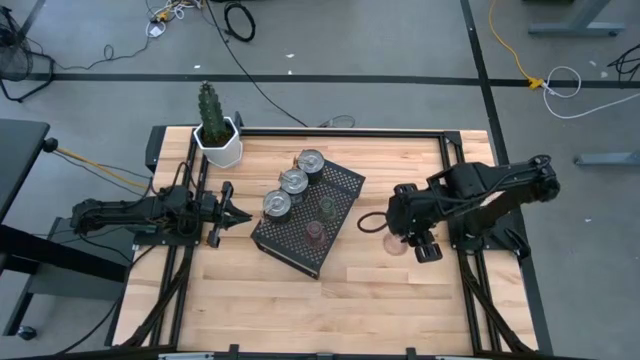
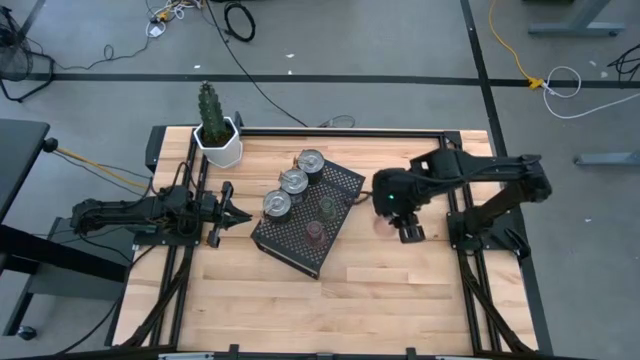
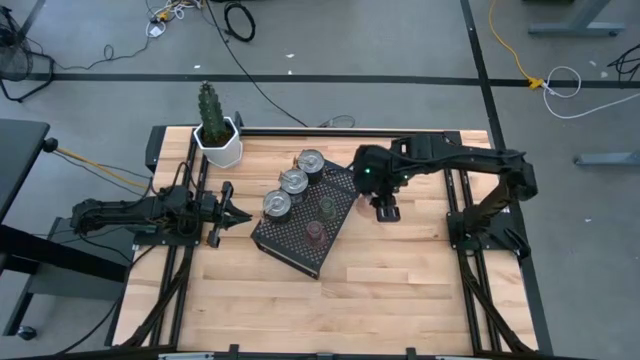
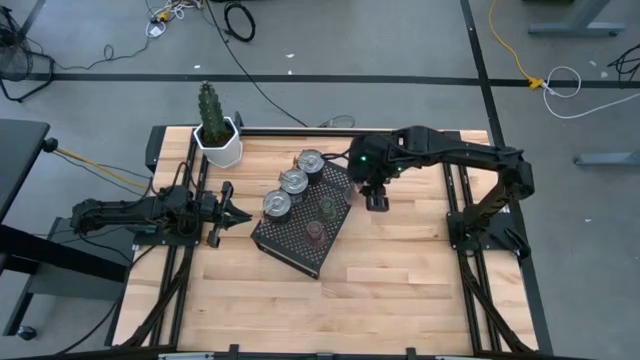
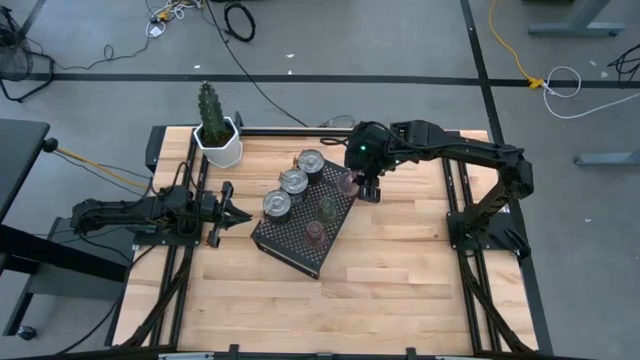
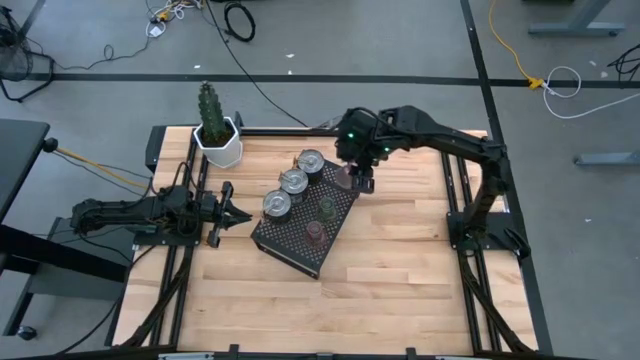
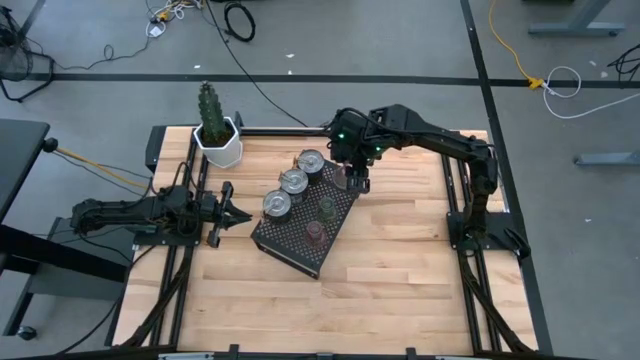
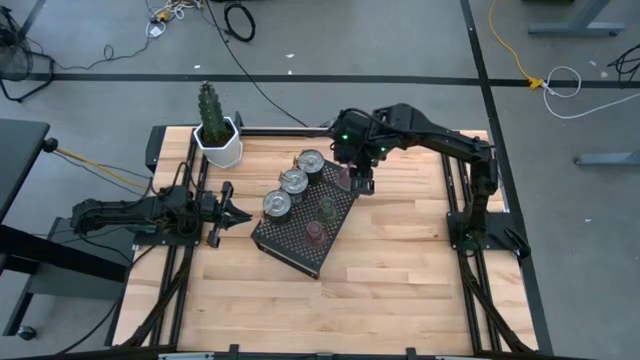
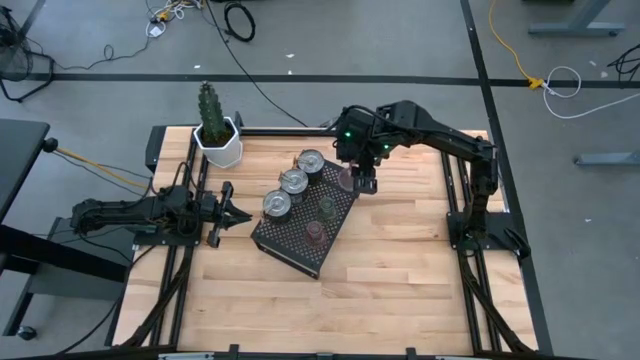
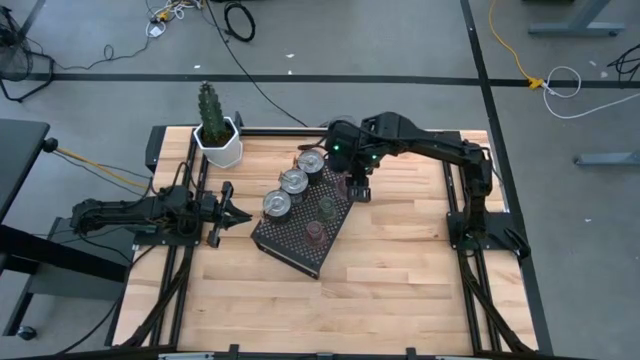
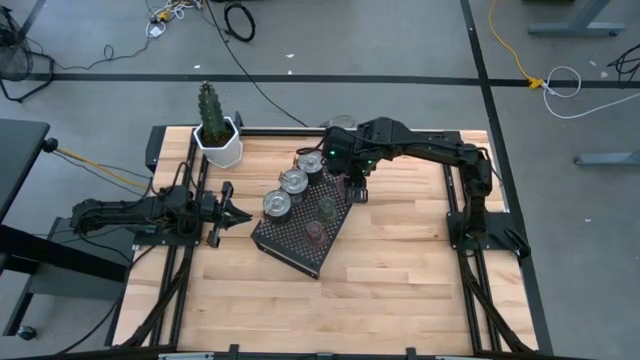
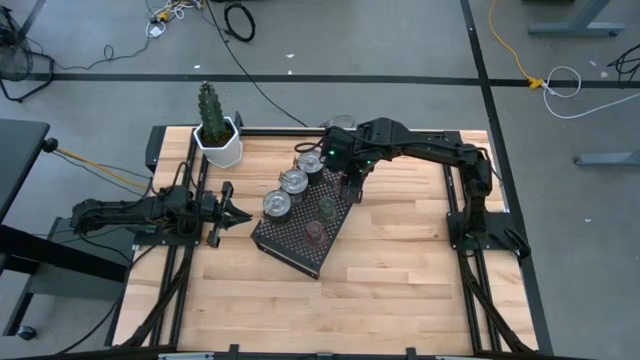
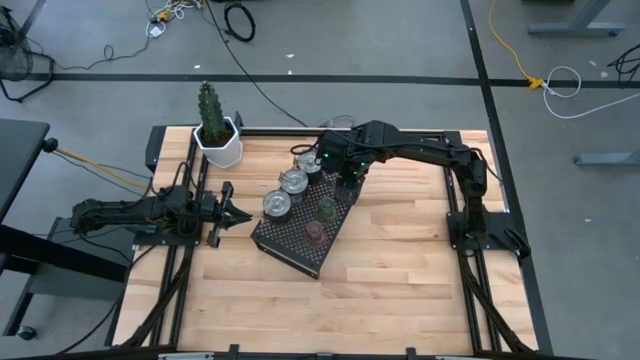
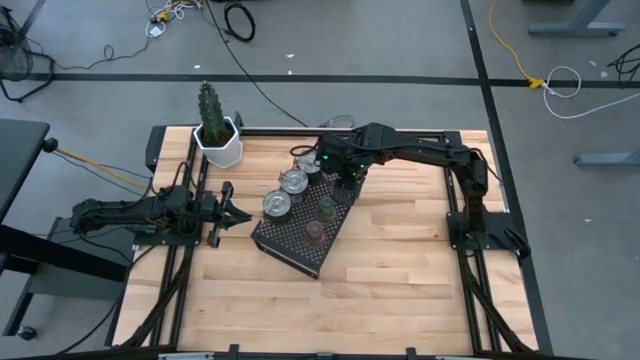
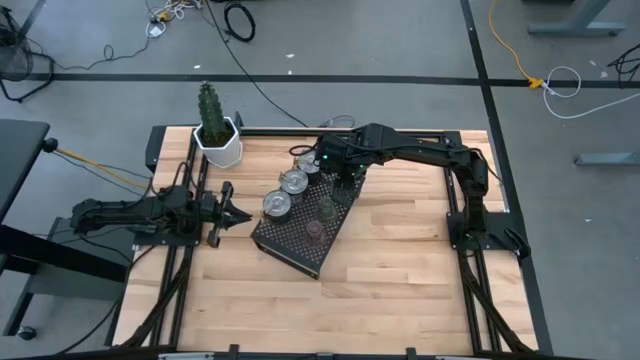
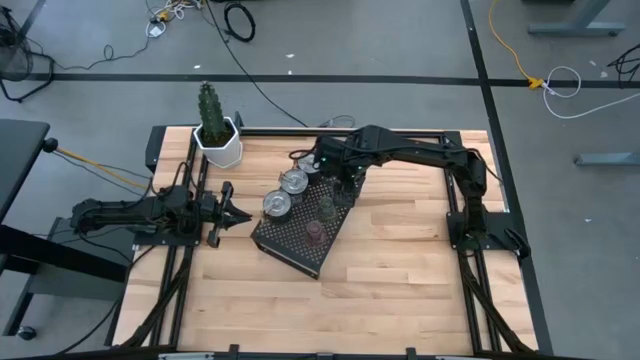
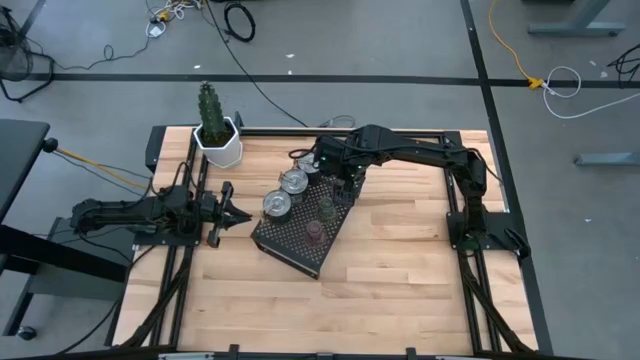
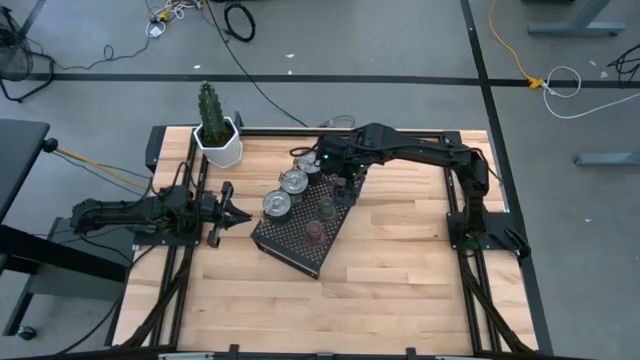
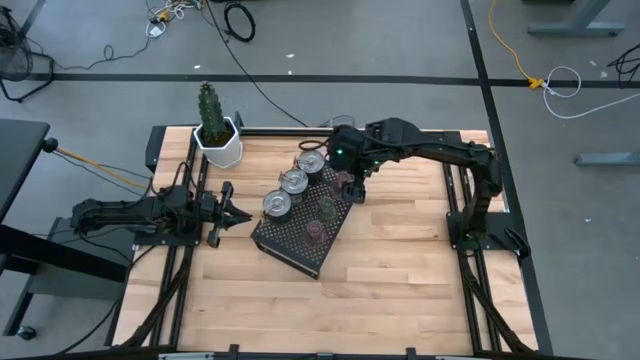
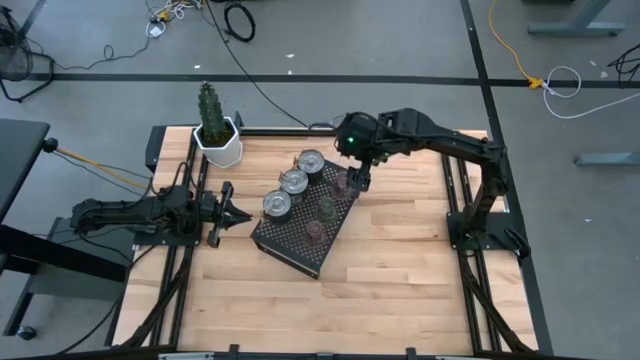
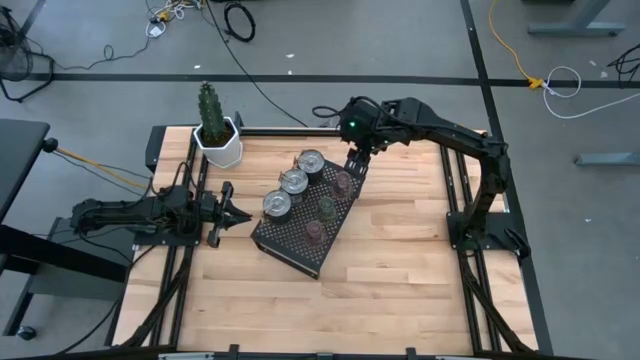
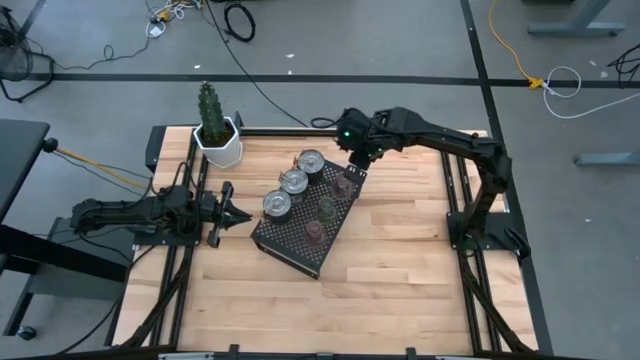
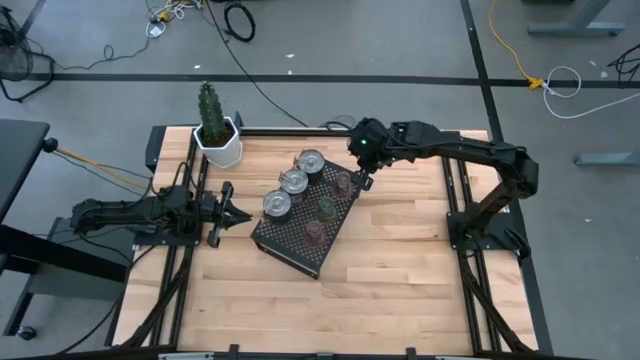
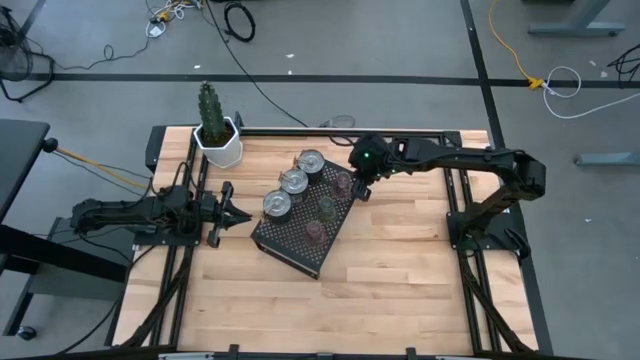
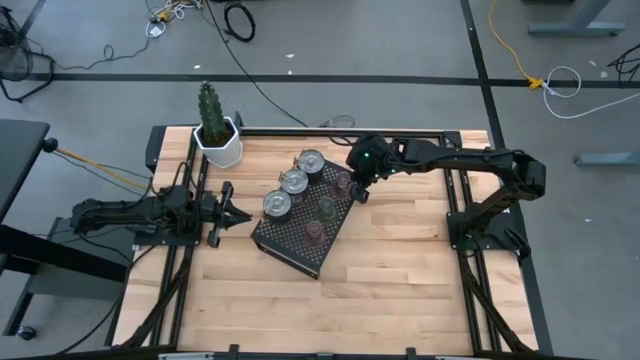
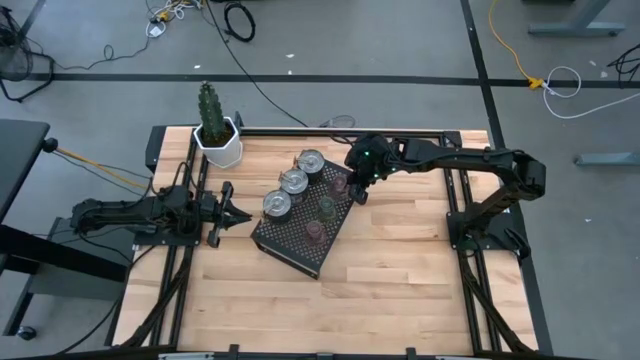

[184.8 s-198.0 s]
Task: Pick & Place candle stick holders
Put the purple candle holder on the shelf

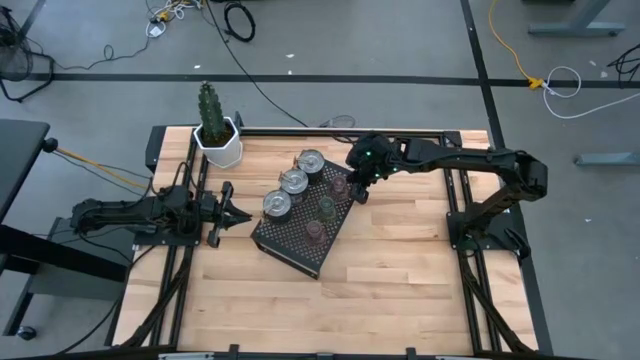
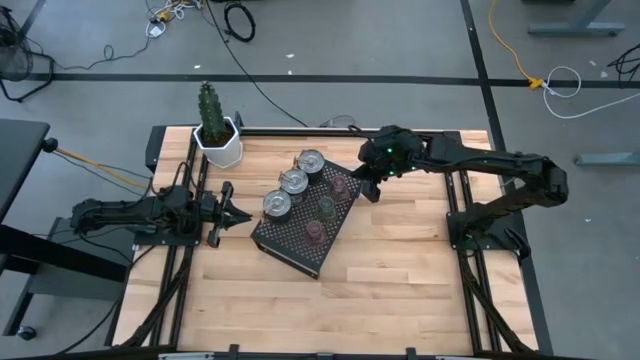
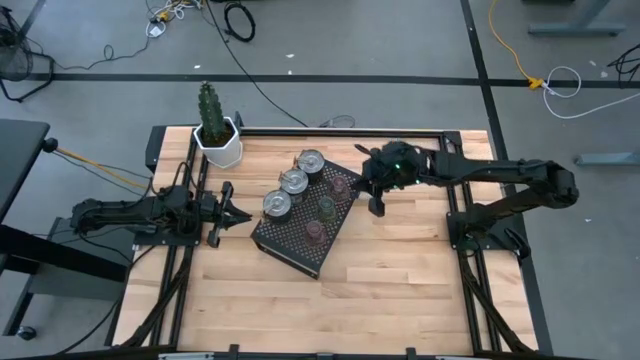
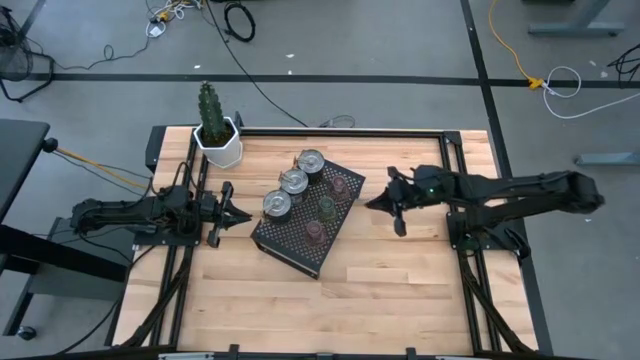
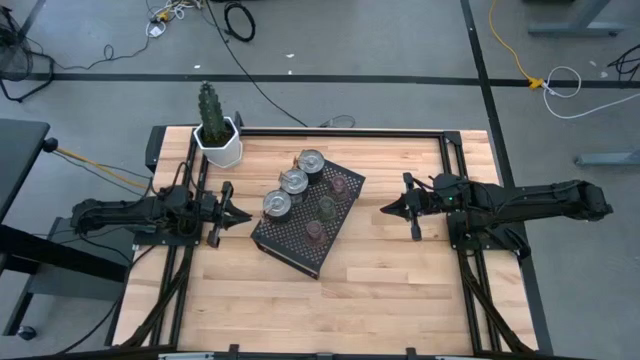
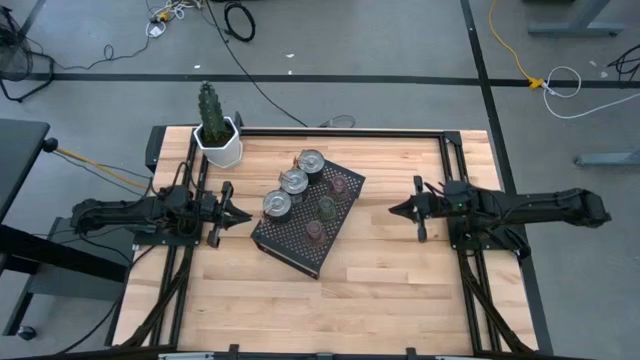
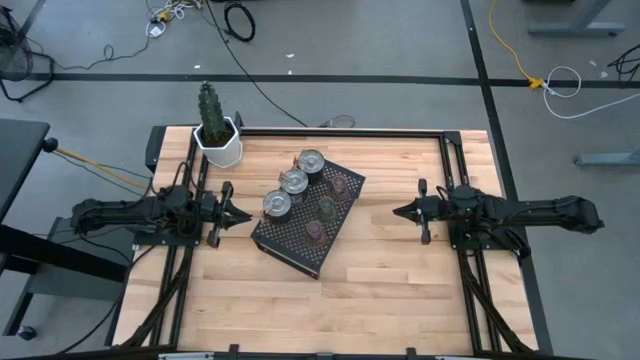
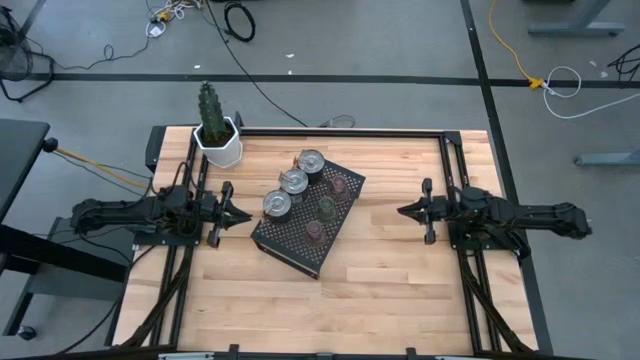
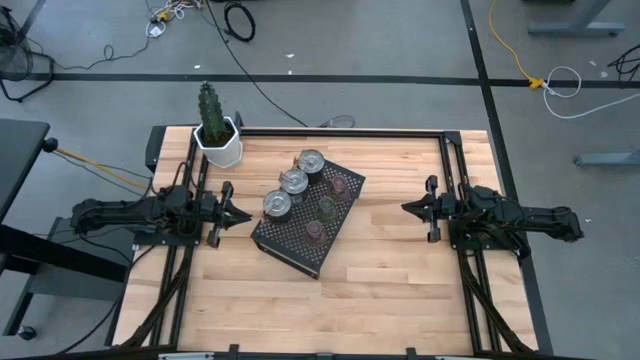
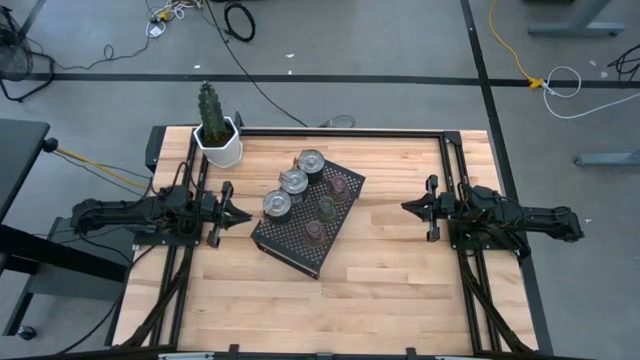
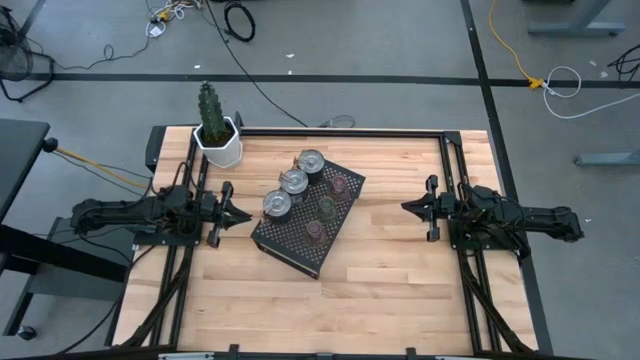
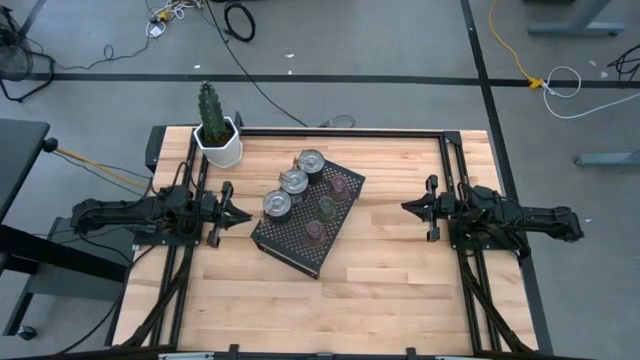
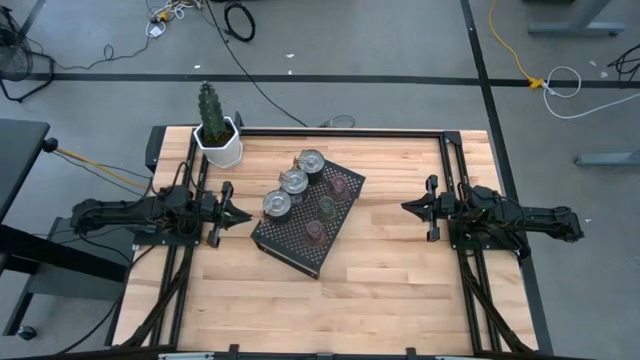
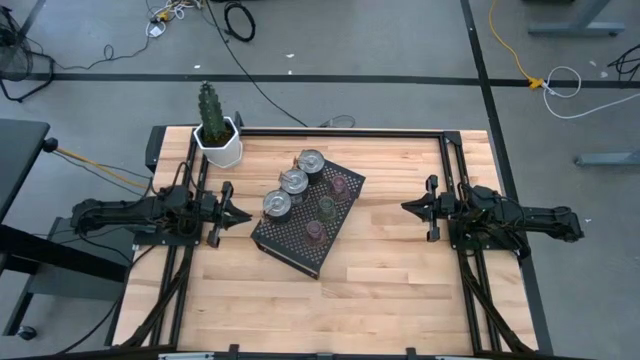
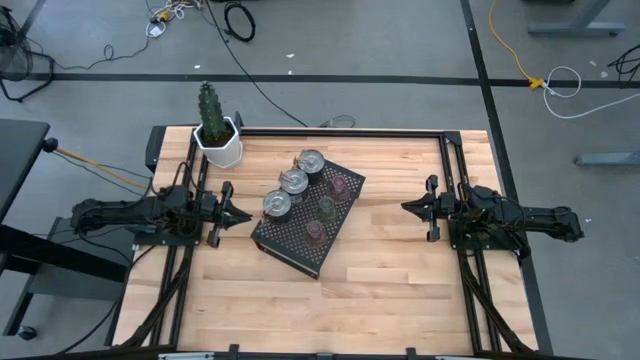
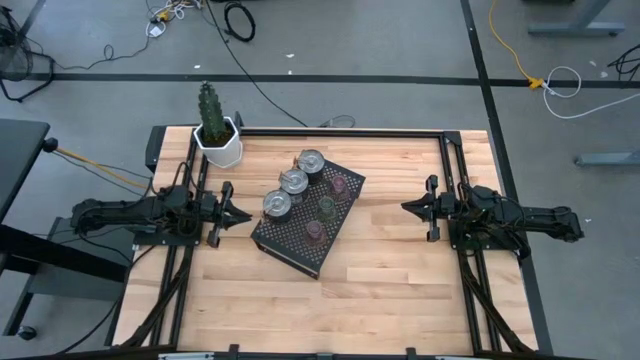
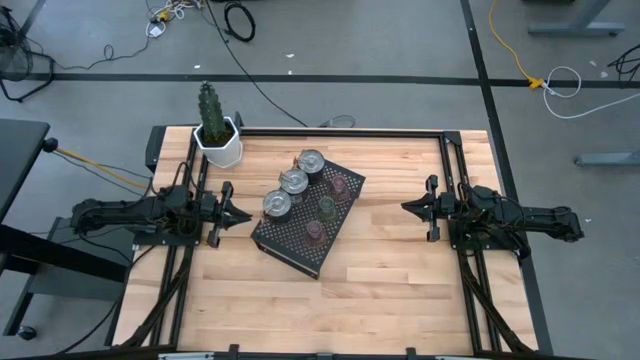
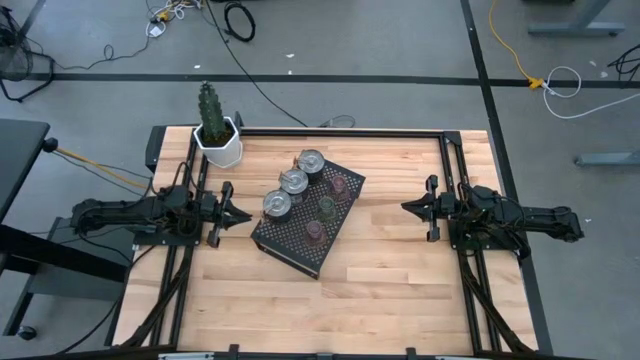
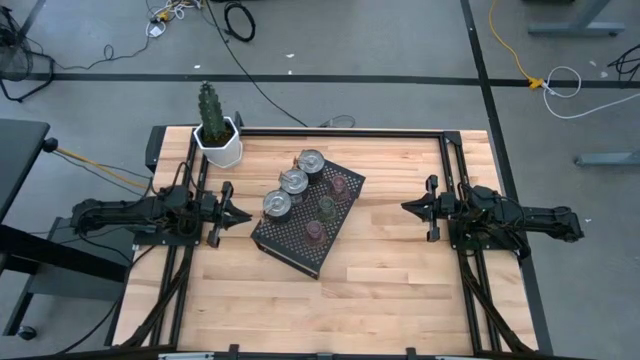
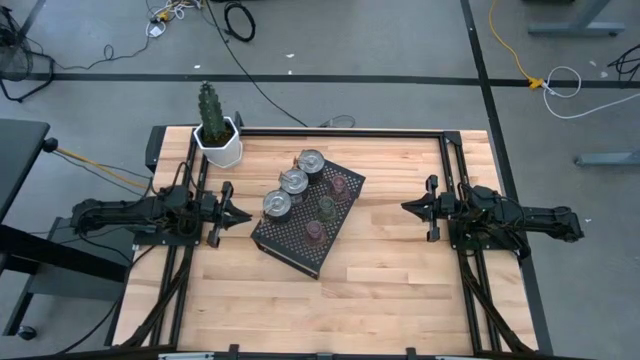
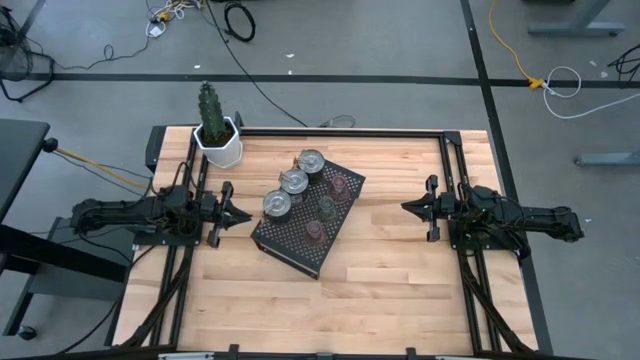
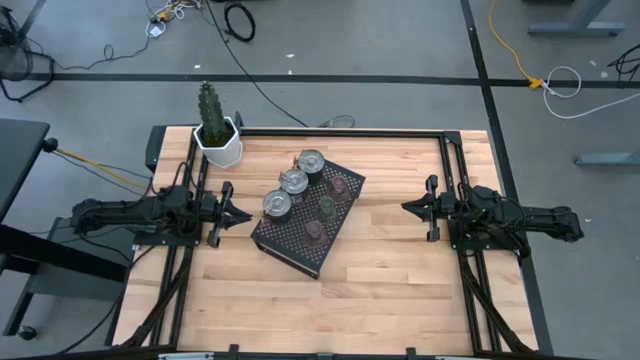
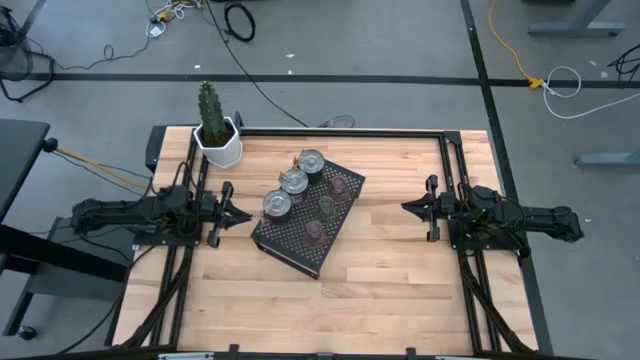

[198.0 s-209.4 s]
Return to Home Position
